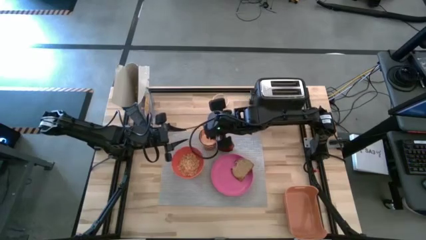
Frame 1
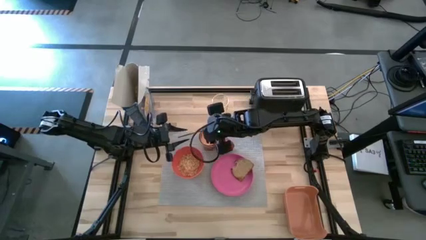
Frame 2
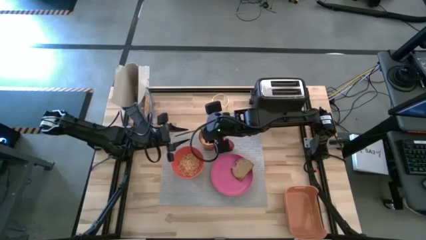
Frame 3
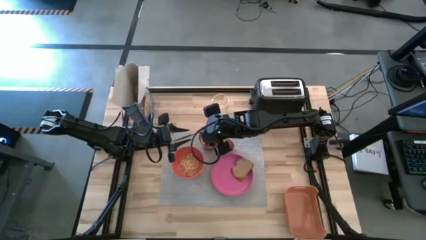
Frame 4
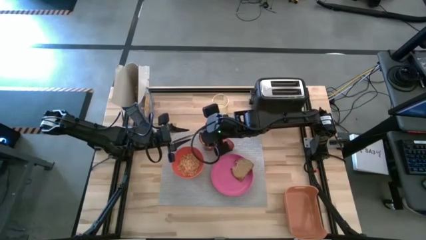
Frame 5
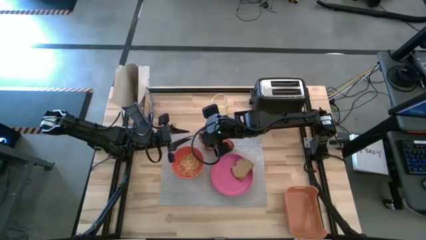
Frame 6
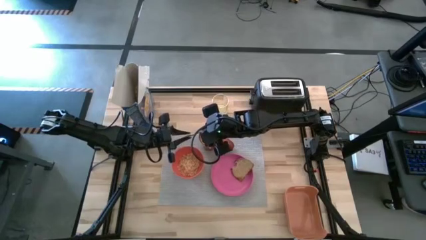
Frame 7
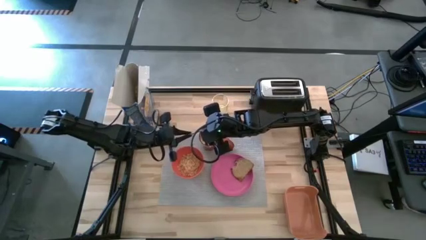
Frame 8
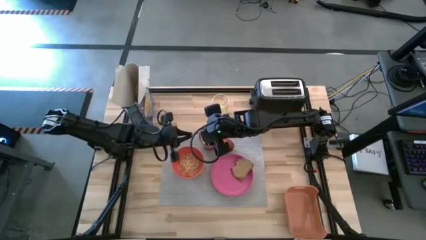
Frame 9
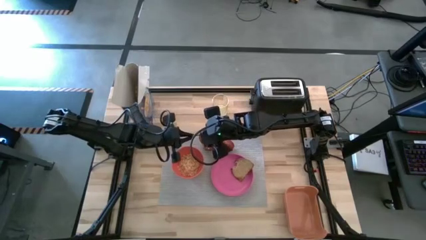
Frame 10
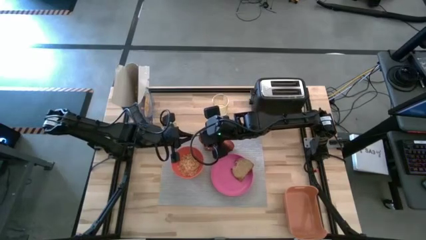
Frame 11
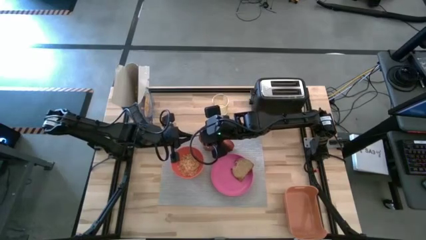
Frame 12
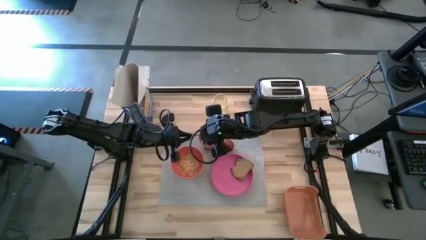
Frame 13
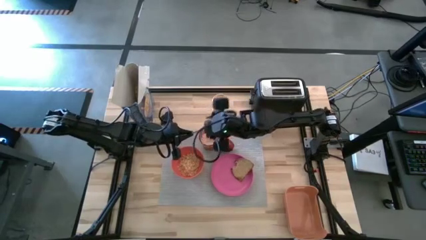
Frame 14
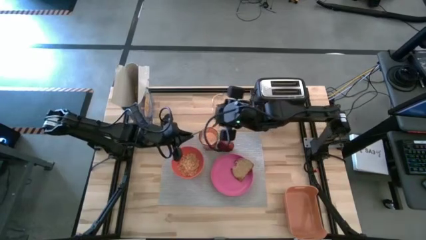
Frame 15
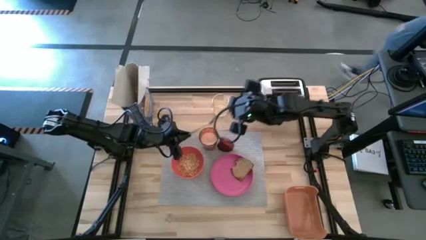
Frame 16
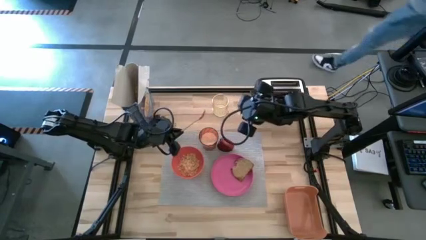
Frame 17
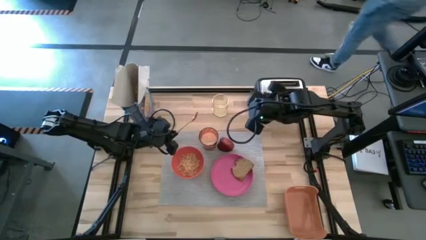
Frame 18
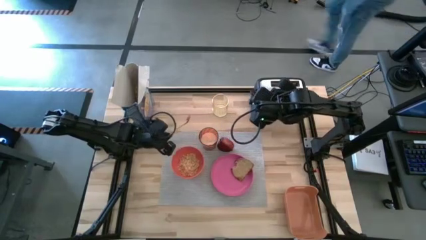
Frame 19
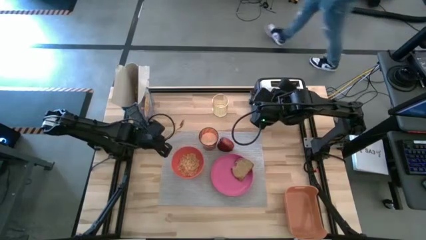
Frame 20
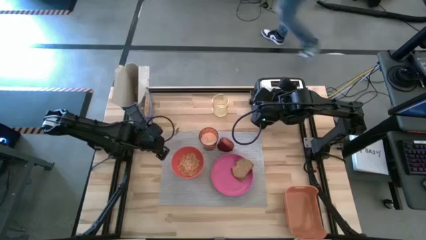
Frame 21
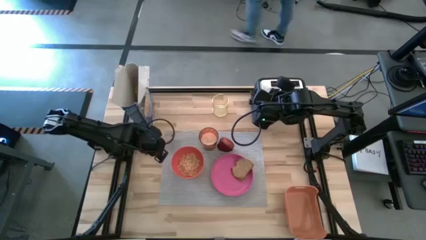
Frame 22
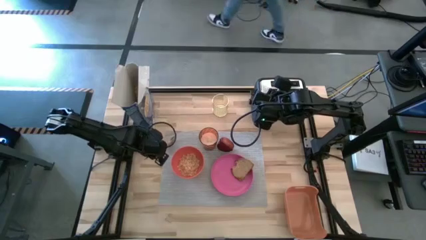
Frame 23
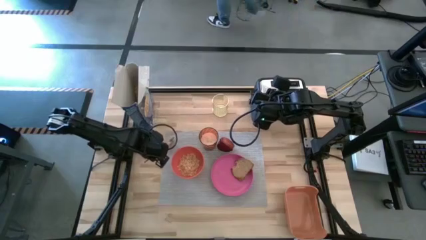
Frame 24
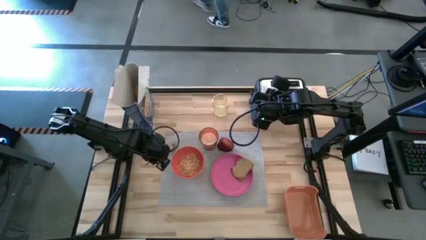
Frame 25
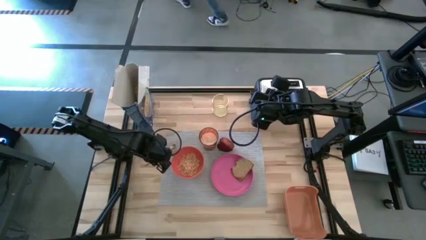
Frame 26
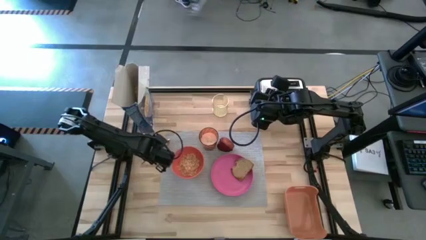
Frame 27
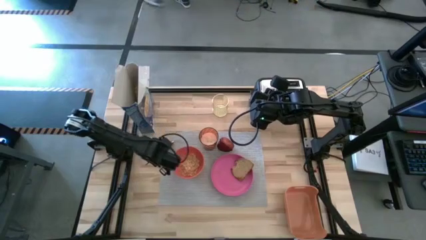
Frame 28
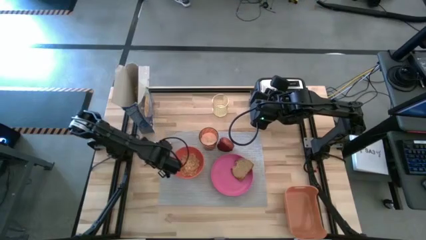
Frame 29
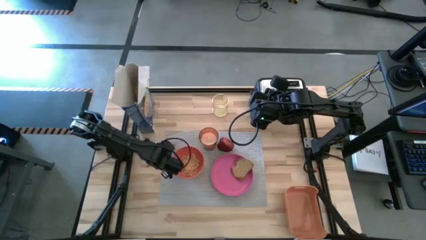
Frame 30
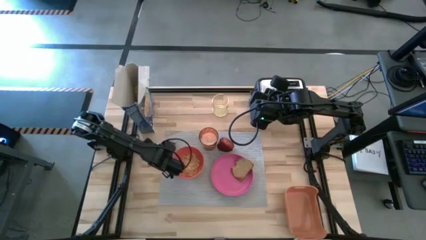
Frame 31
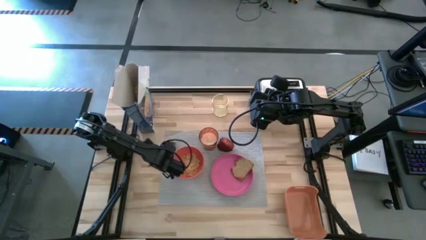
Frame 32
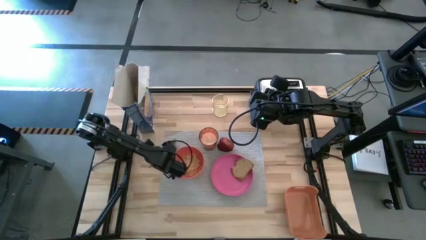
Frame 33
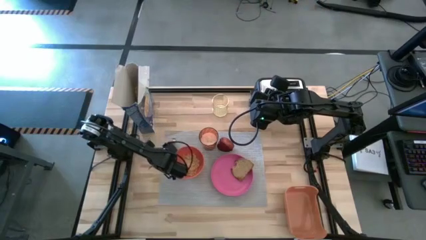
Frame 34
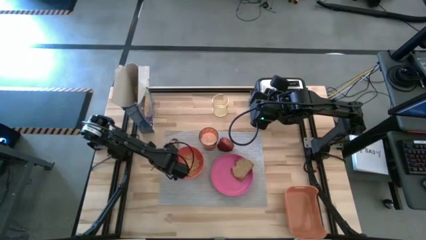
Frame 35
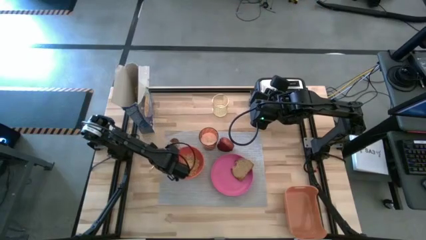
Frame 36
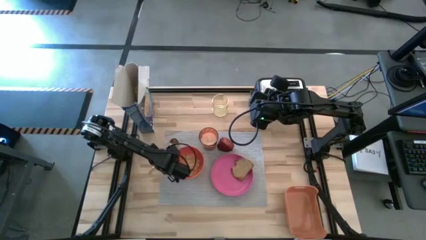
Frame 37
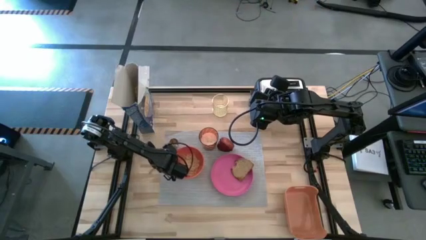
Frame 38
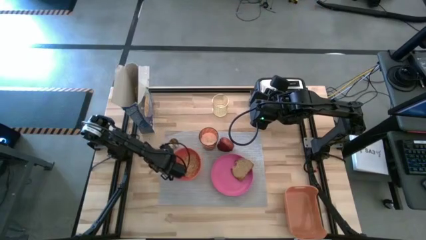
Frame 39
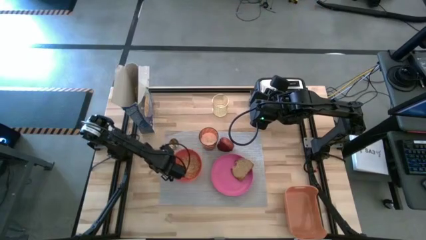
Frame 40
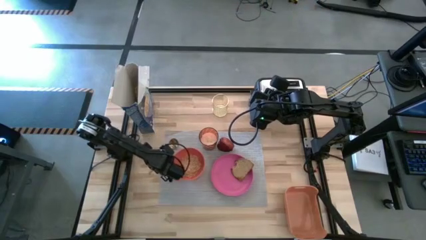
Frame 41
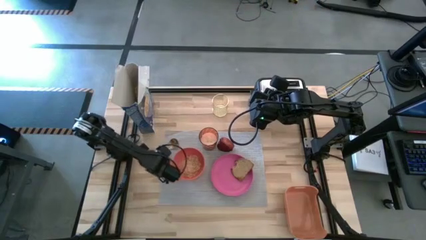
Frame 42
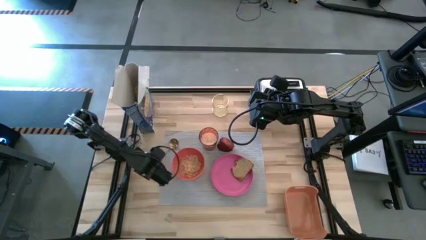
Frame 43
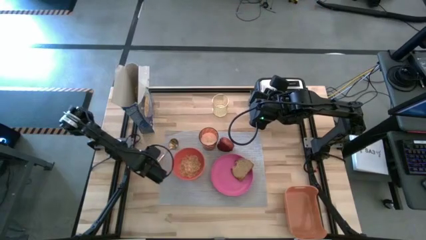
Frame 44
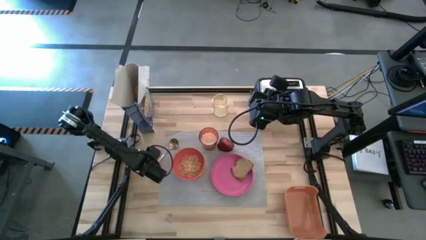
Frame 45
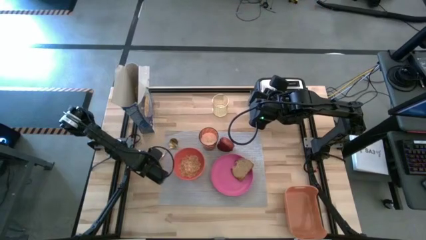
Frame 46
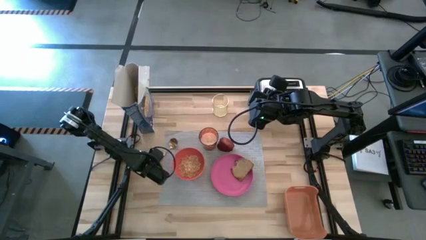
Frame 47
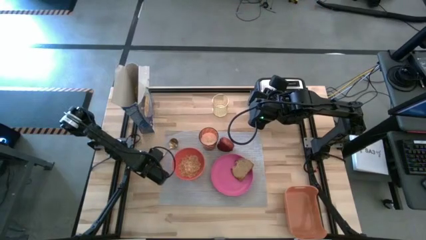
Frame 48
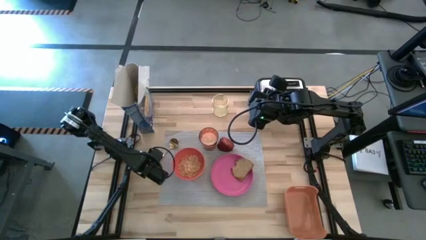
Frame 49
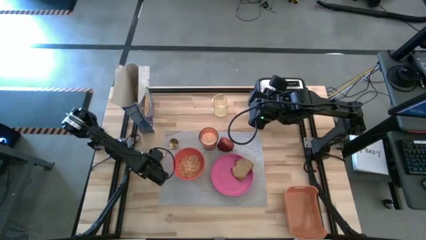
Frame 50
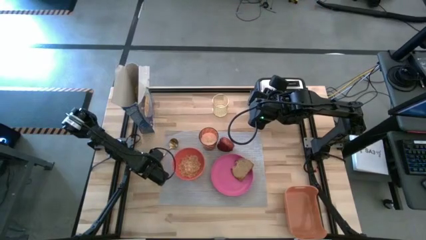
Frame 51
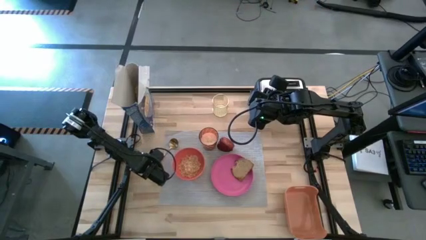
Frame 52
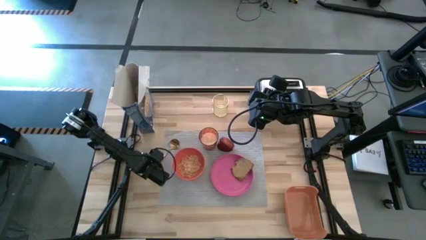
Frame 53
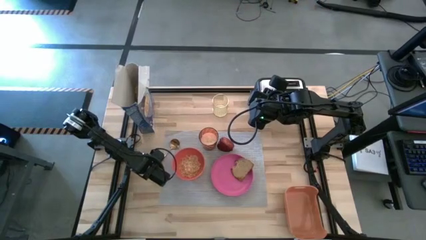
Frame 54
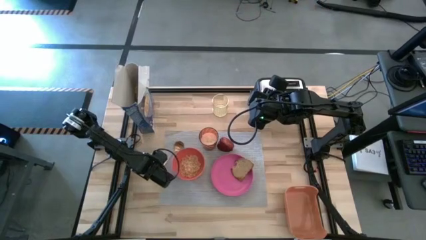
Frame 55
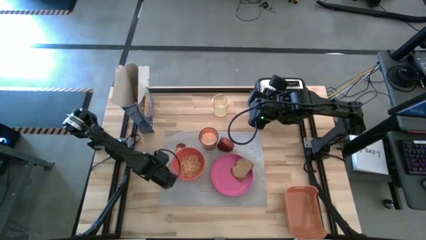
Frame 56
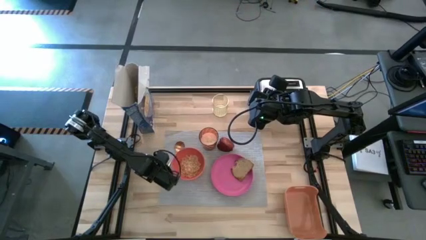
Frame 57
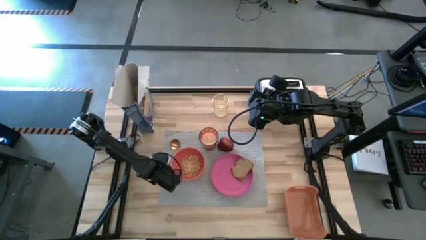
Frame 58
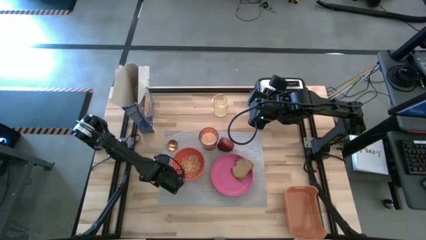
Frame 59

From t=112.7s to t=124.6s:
Task: Arrange a breakfast setting
Put the yellow spoon from the orange cup on the gray placemat
